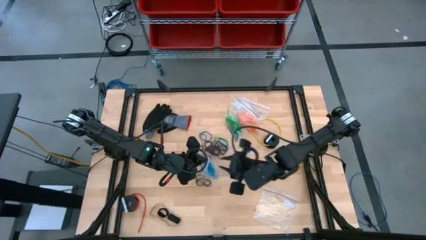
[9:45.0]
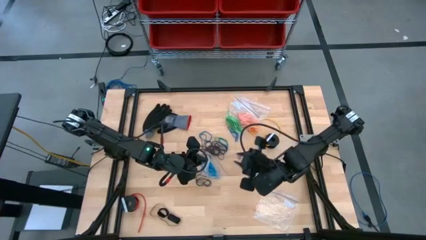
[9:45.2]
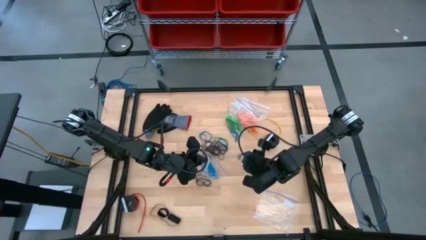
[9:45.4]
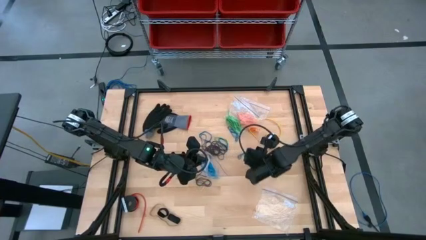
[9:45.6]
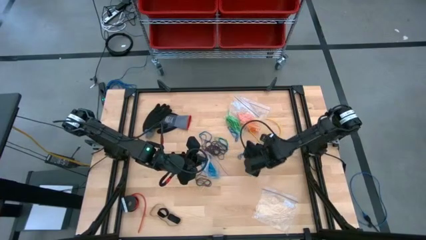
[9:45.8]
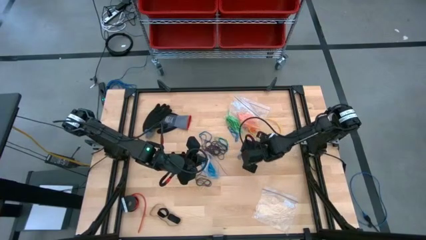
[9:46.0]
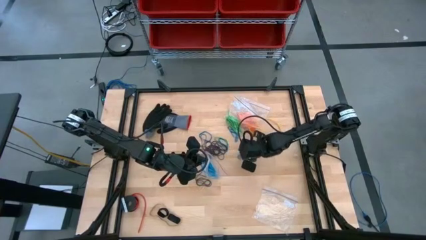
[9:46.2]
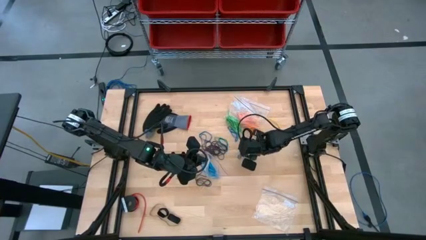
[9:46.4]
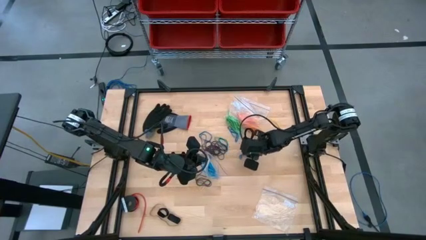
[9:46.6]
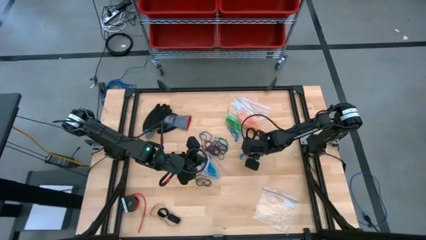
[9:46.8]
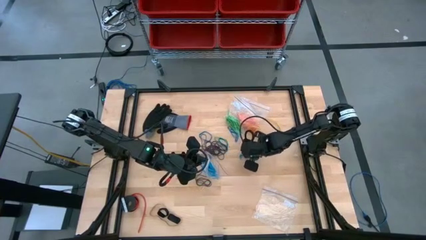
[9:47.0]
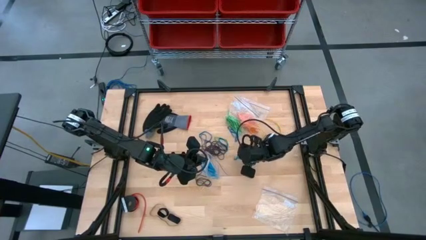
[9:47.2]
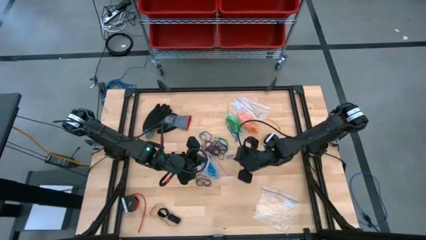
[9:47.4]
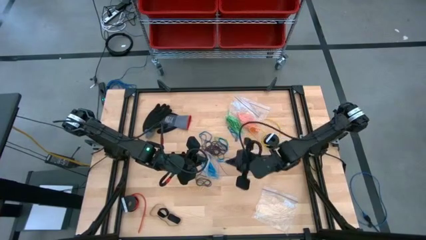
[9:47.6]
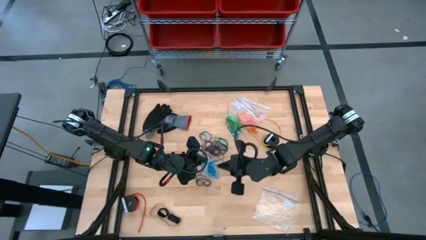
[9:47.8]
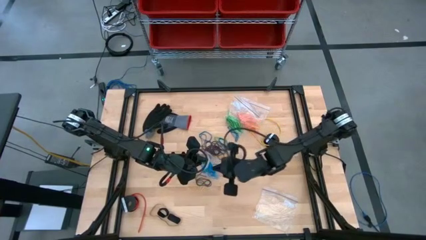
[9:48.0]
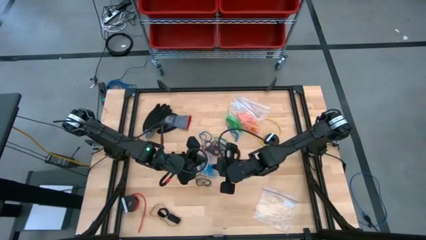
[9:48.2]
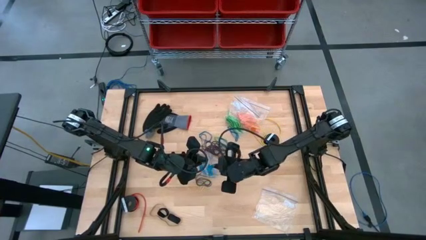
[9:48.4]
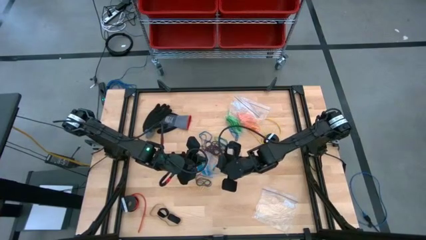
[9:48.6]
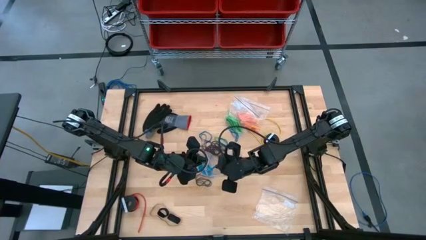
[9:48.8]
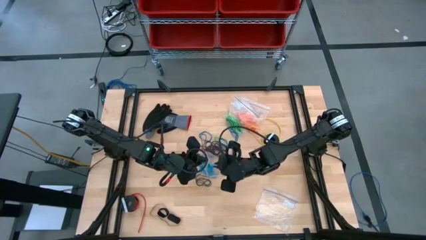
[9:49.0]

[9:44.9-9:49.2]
Task: Sort rubber bands
Put the blue rubber band into the transparent zip bag

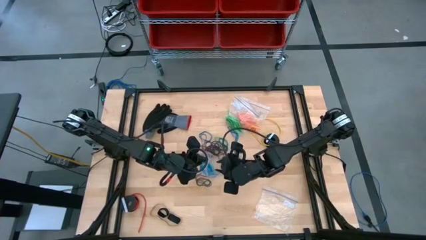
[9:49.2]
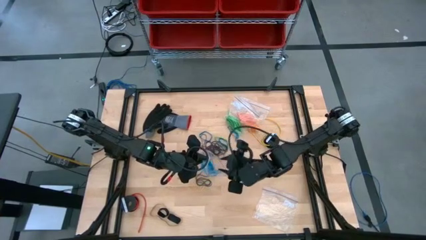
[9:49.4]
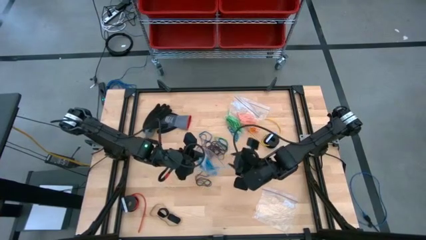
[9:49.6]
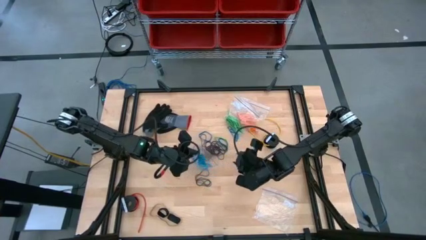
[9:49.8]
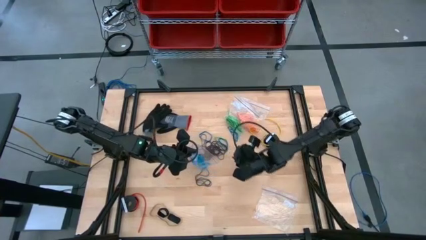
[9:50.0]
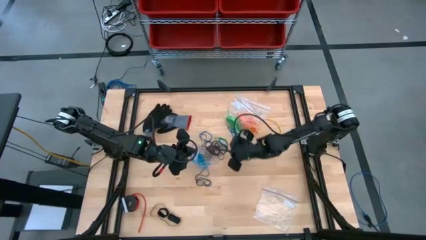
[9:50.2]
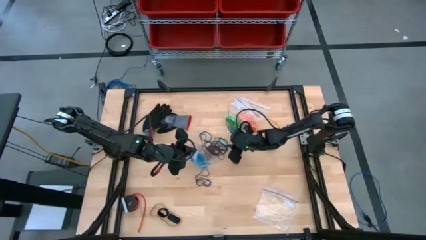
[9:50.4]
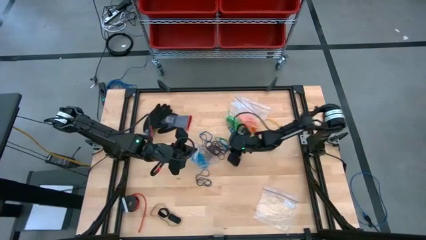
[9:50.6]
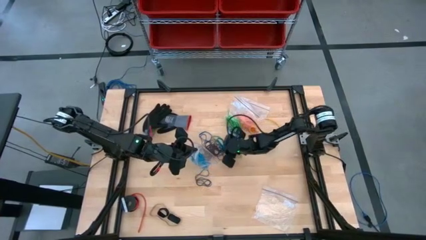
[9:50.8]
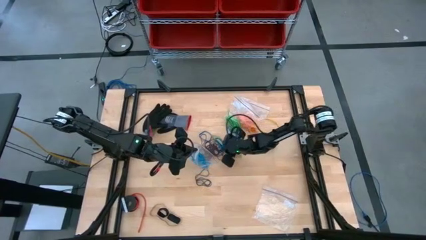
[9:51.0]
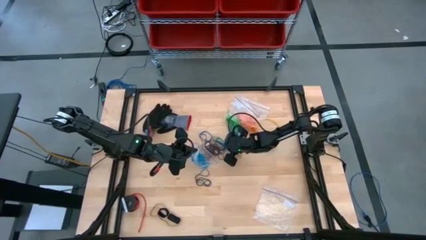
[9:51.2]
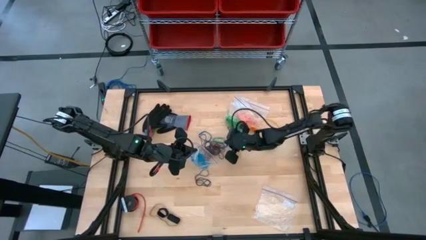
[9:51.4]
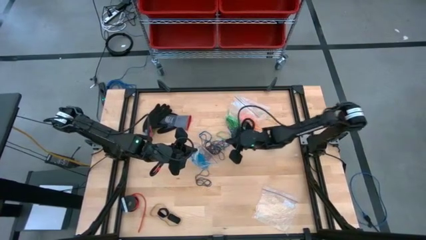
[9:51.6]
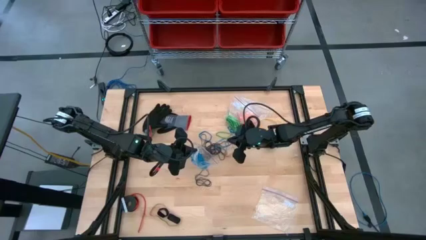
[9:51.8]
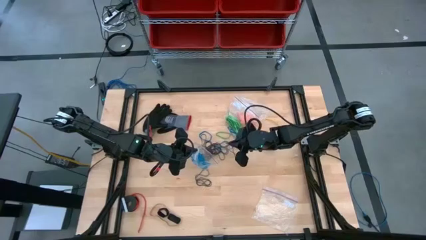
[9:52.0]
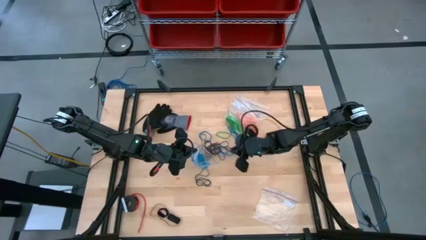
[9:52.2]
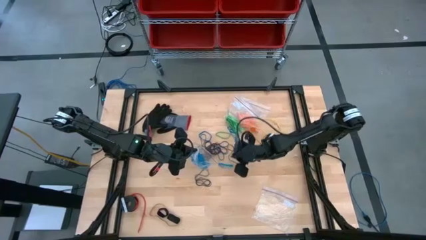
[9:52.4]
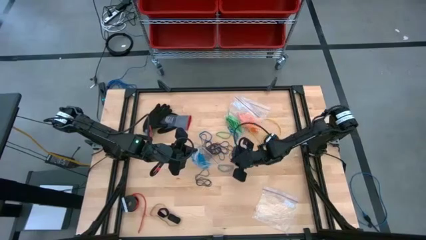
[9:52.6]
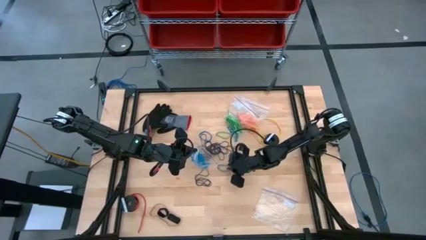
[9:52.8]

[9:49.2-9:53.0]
Put the blue rubber band into the transparent zip bag

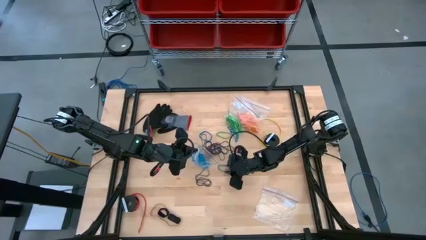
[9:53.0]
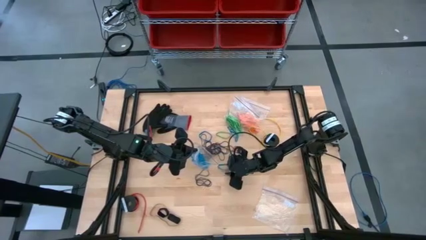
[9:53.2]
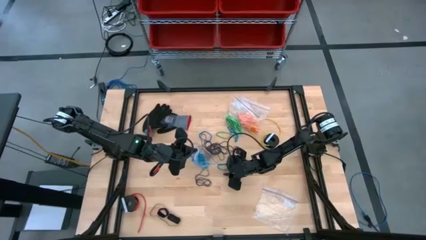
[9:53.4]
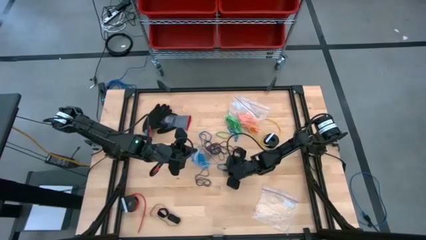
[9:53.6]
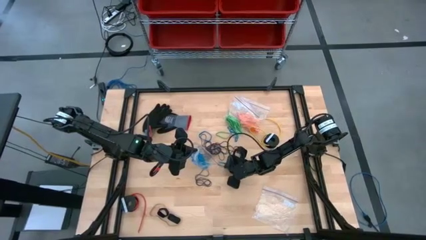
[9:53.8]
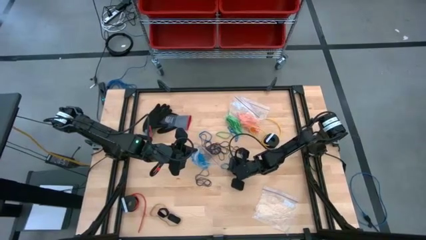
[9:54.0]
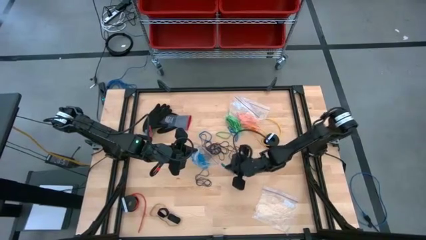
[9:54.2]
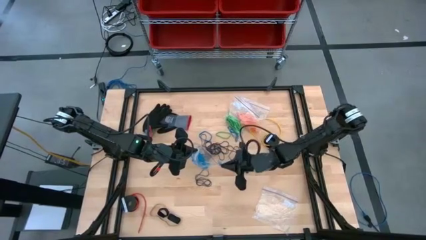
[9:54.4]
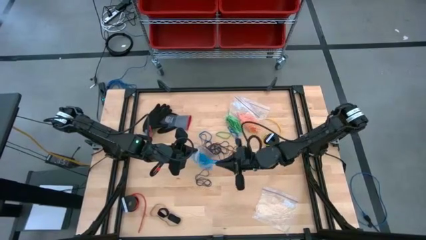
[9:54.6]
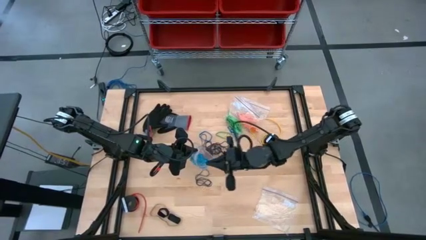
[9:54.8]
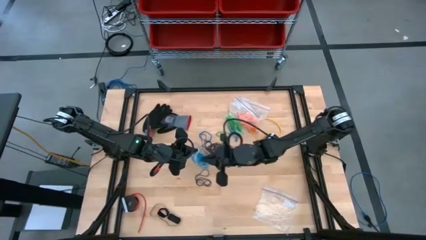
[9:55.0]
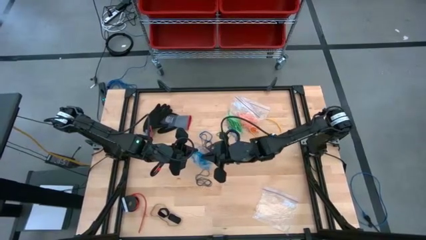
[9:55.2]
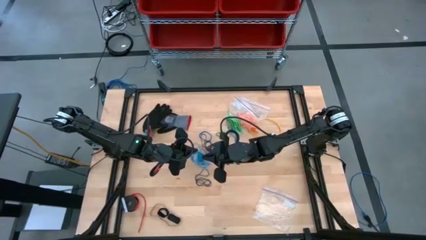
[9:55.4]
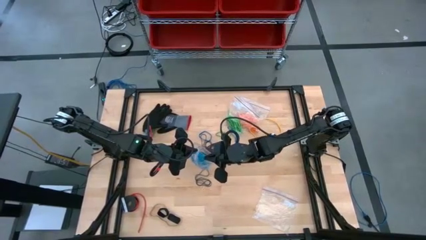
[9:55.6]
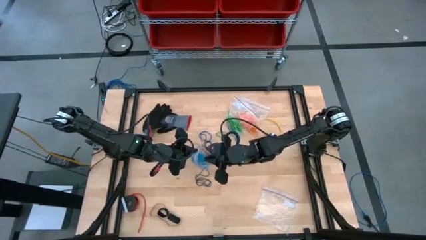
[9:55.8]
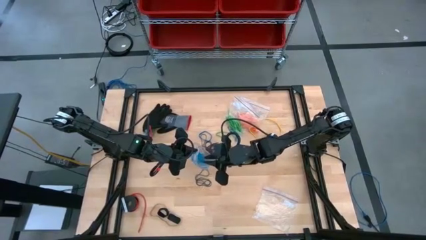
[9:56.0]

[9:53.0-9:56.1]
Put the blue rubber band into the transparent zip bag

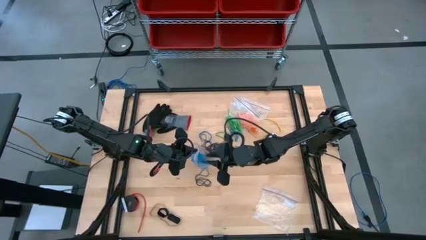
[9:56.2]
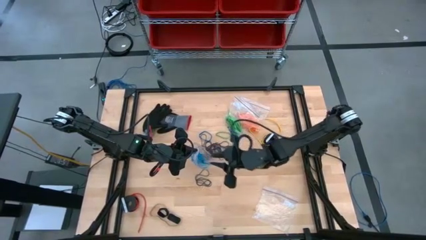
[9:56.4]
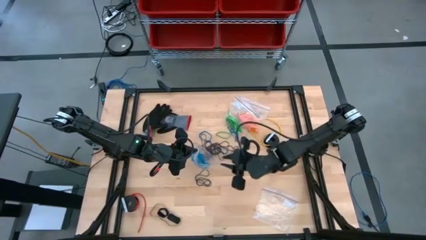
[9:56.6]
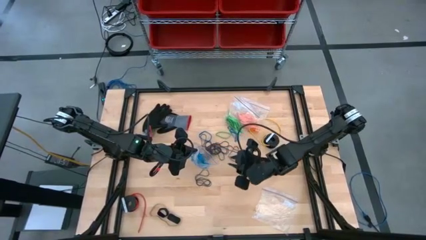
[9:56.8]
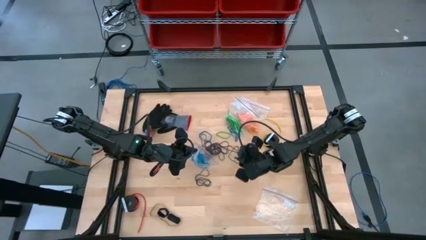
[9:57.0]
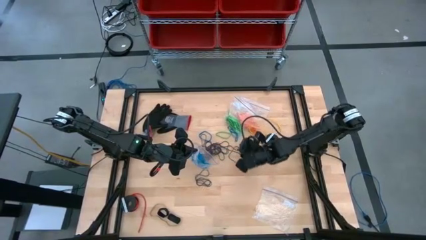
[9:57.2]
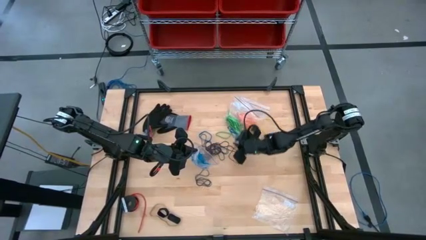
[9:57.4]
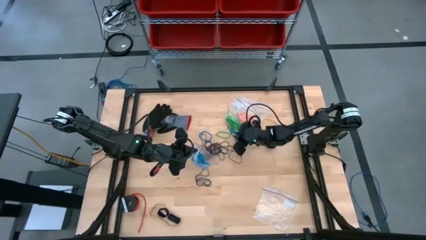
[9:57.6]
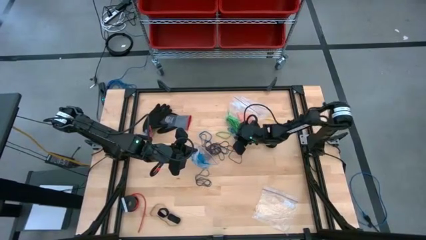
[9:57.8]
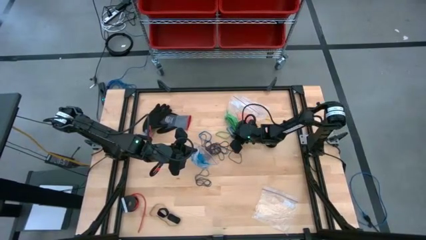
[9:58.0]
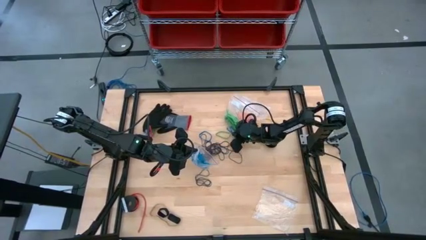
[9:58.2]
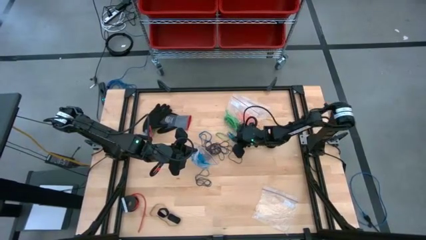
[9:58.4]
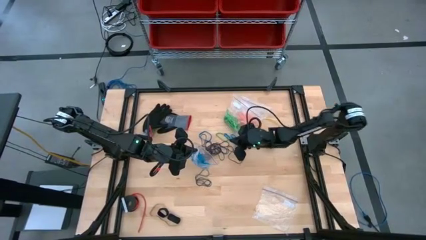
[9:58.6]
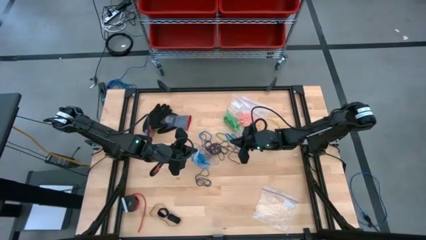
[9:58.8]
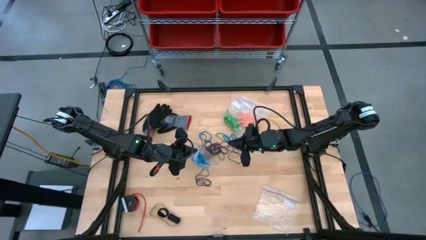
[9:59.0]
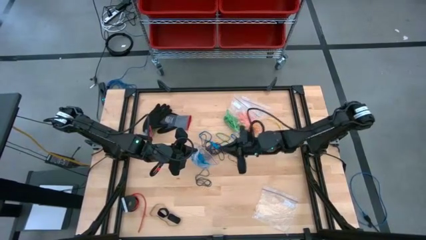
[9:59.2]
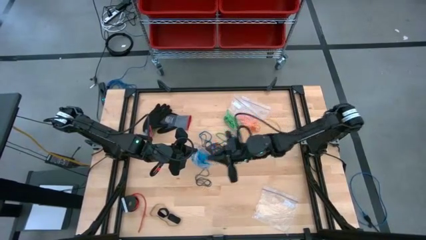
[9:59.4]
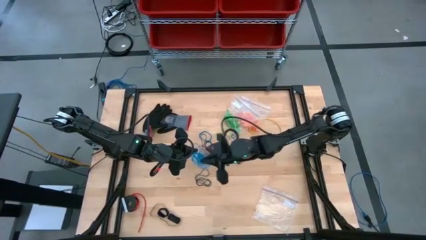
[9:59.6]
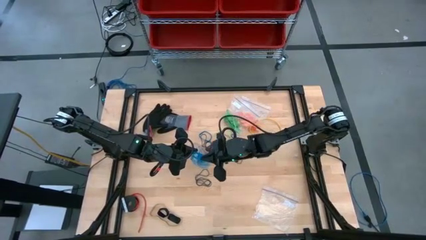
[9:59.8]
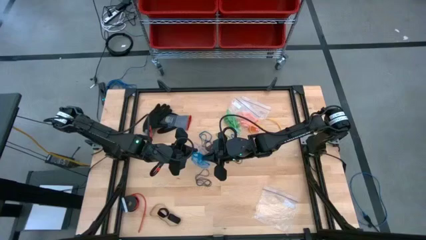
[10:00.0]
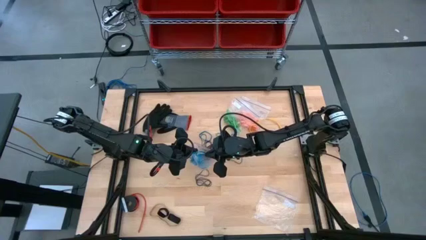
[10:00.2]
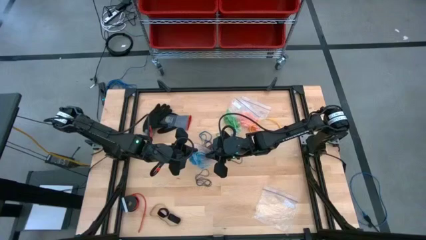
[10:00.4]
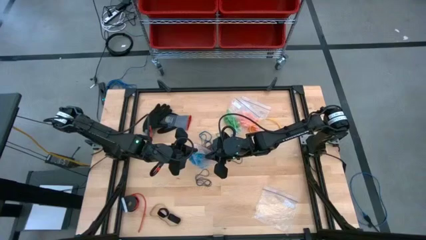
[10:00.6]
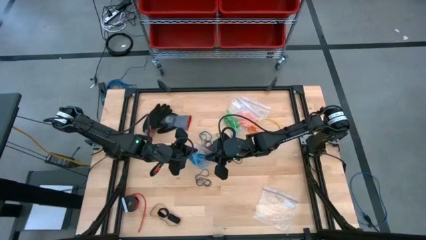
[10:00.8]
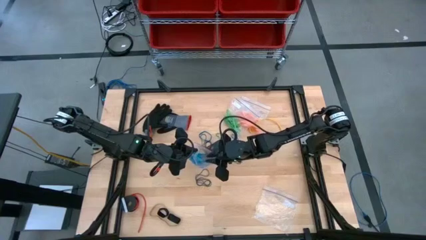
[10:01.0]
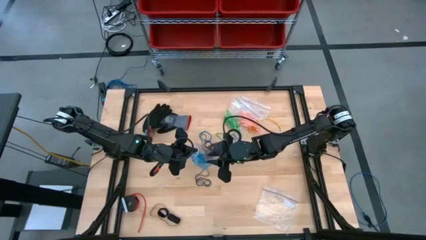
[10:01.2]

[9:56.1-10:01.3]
Put the blue rubber band into the transparent zip bag
